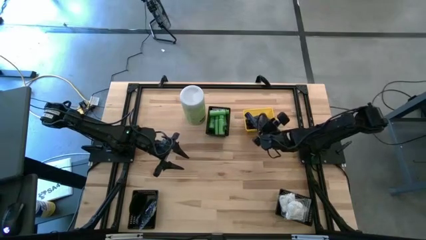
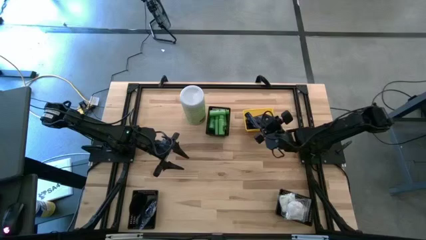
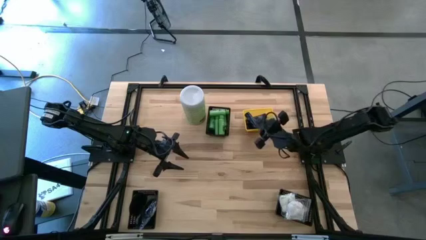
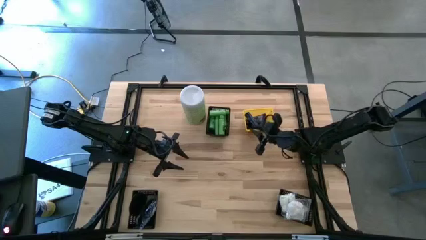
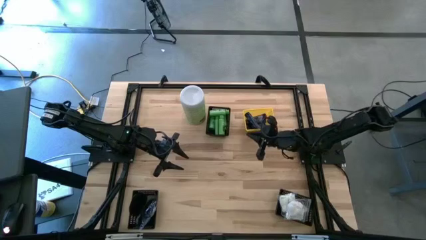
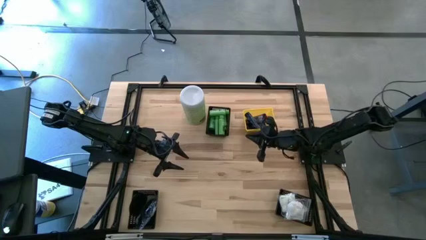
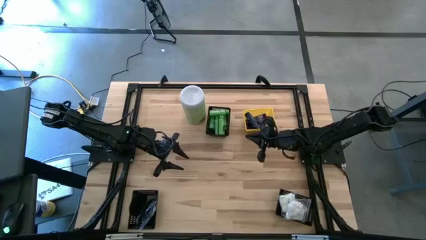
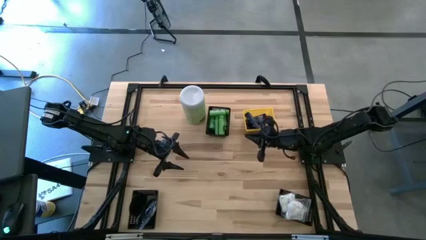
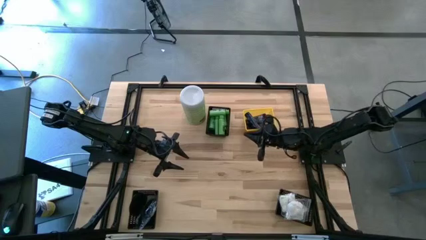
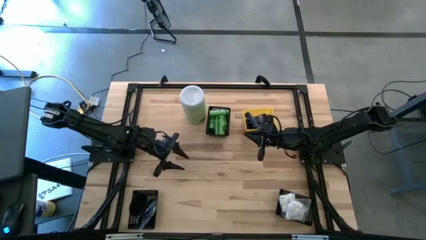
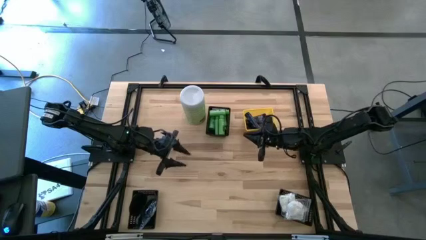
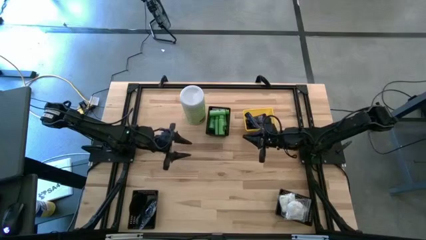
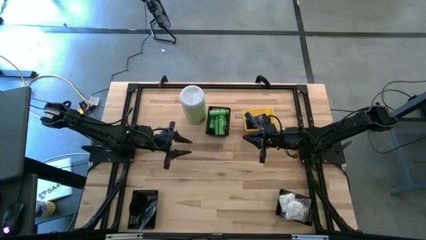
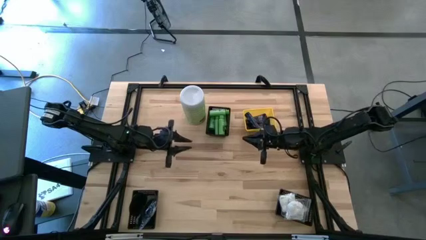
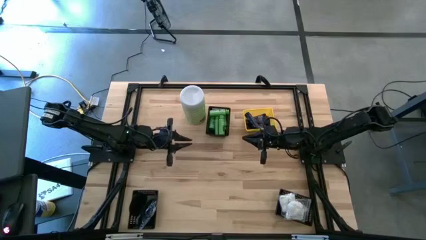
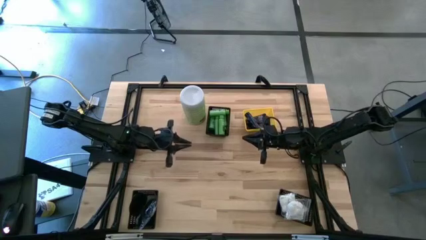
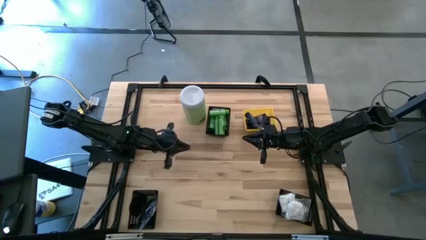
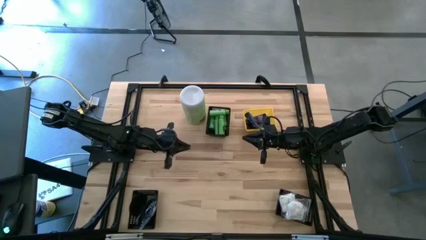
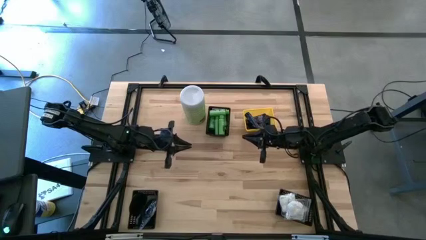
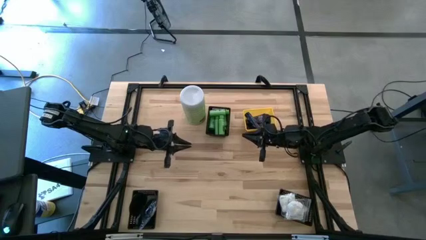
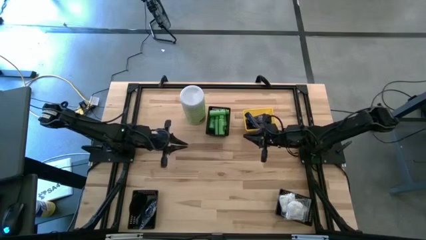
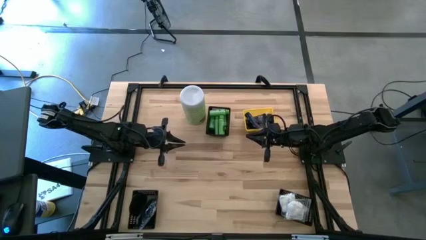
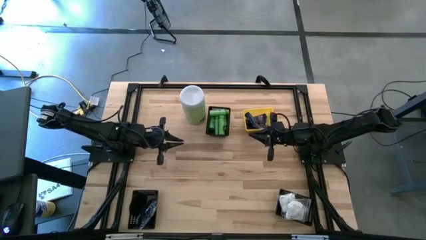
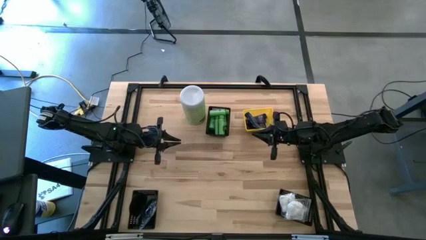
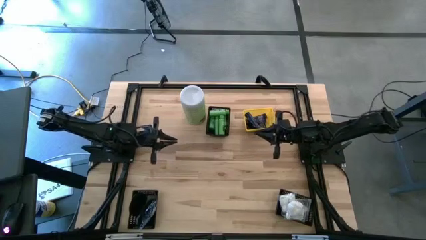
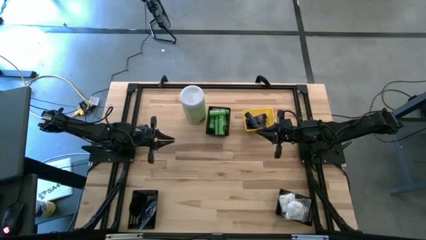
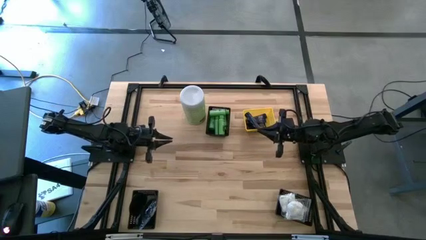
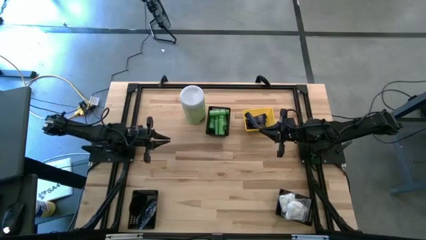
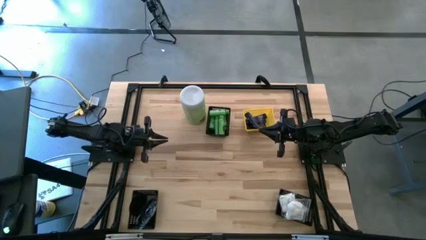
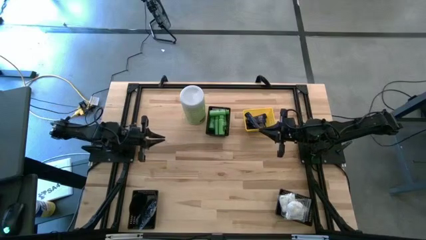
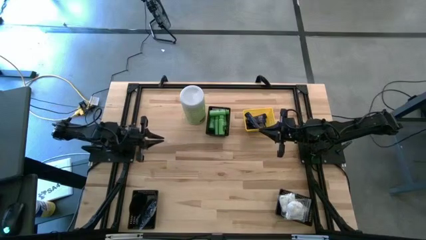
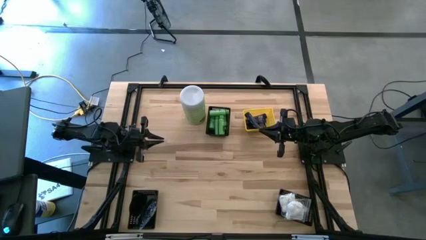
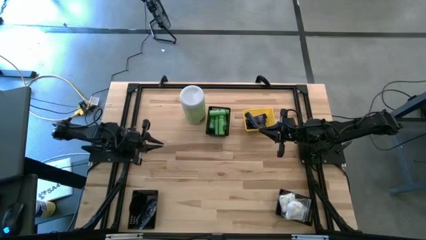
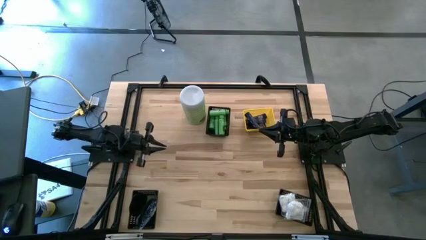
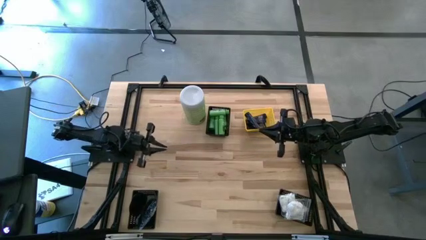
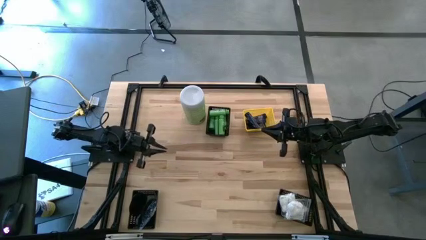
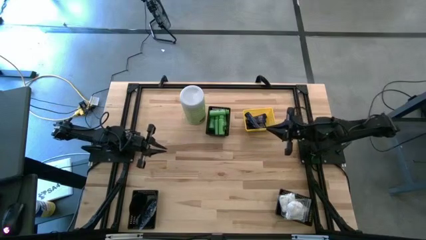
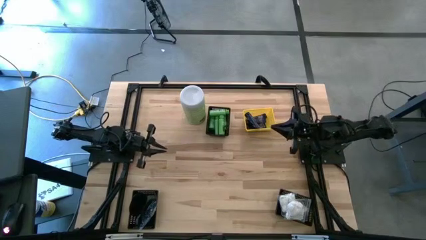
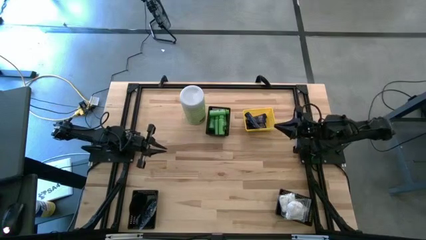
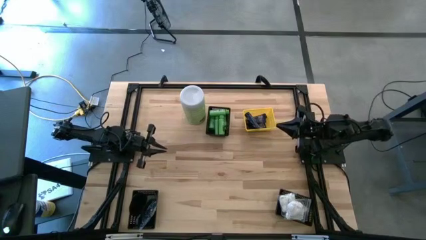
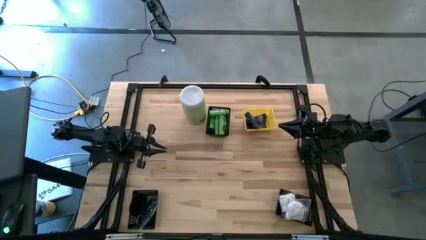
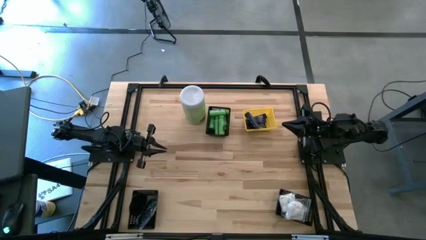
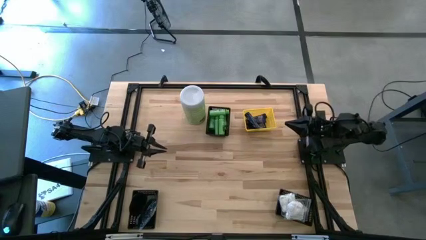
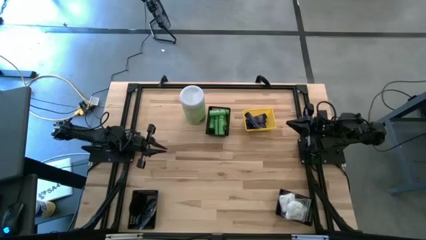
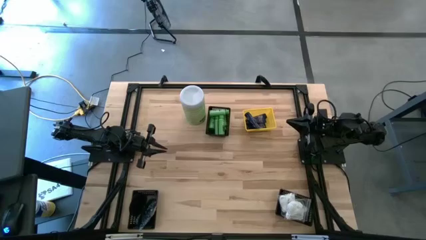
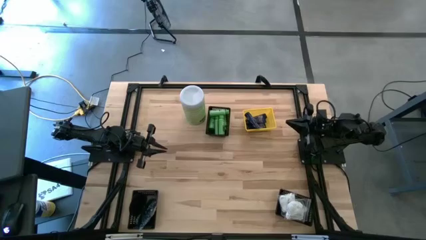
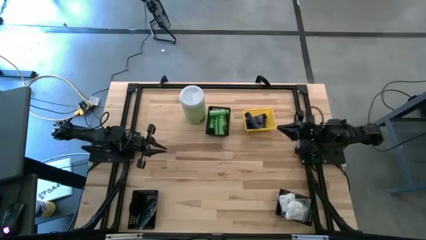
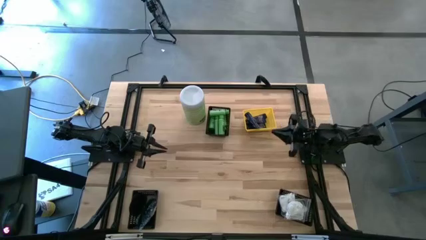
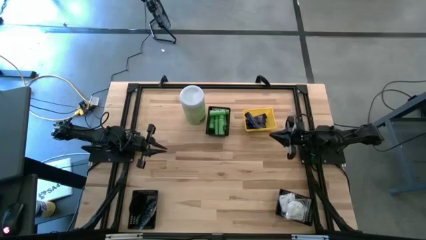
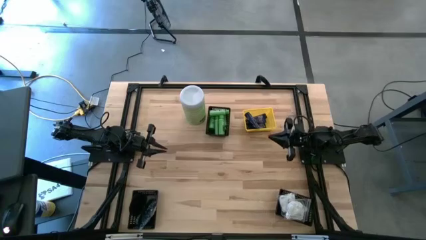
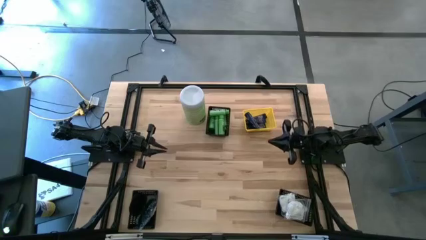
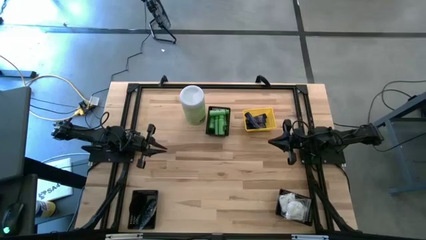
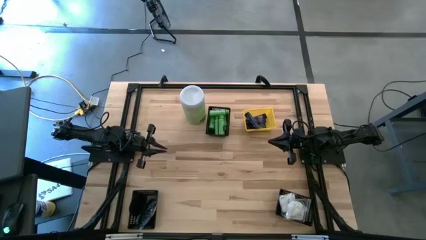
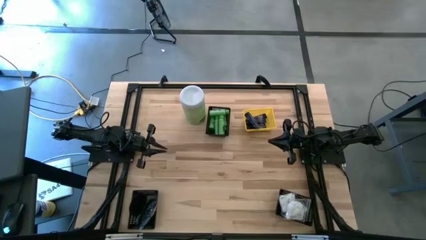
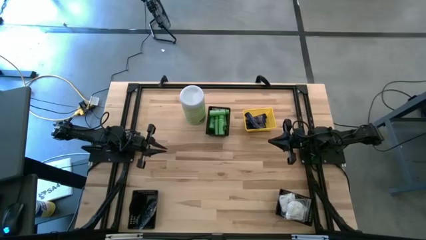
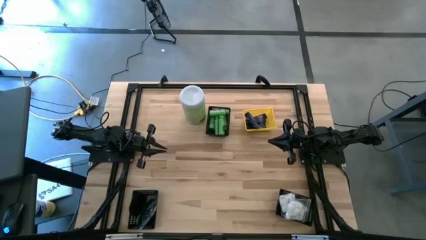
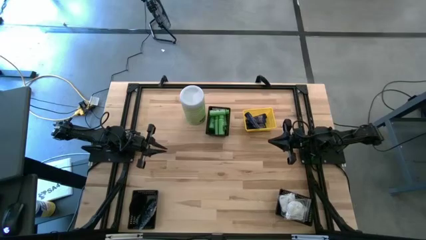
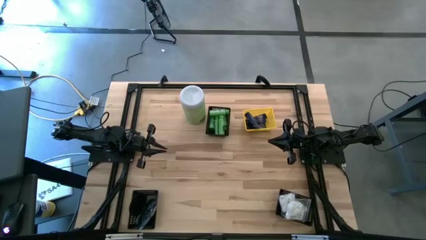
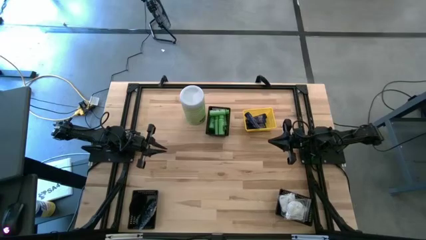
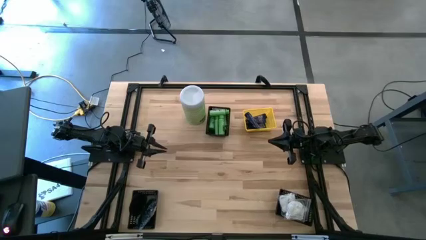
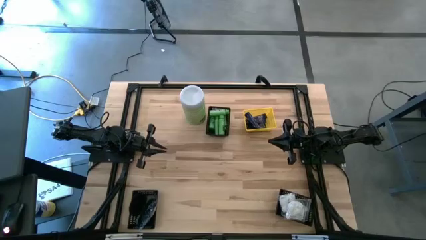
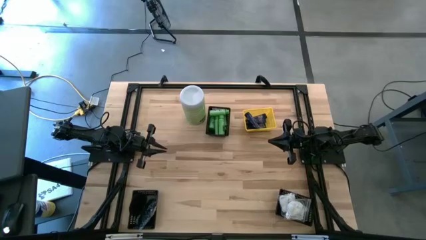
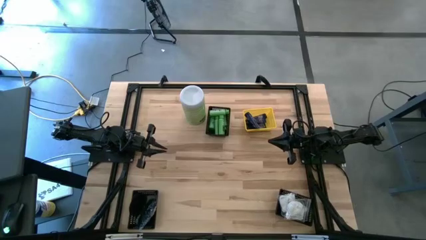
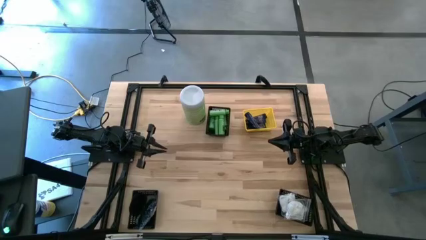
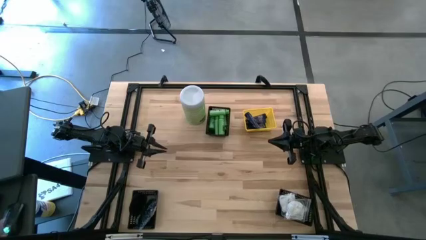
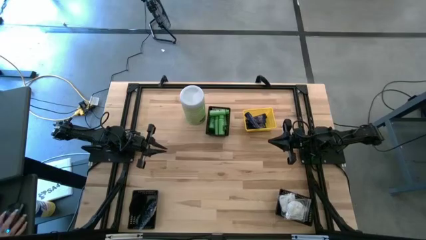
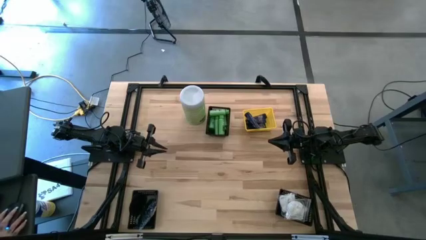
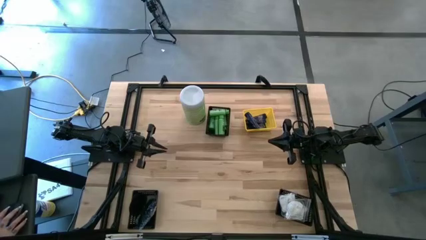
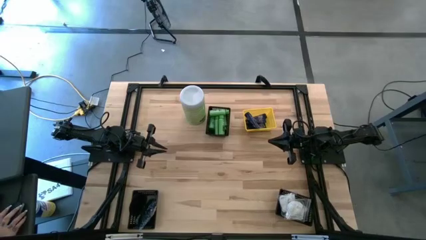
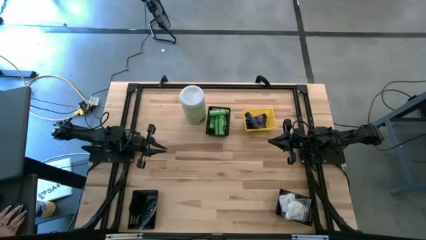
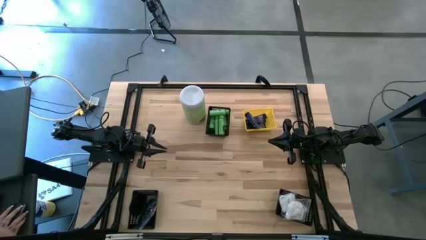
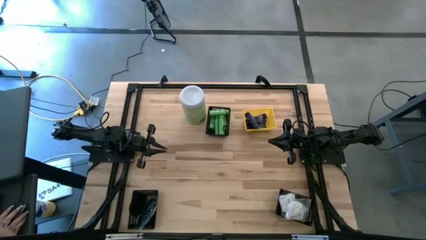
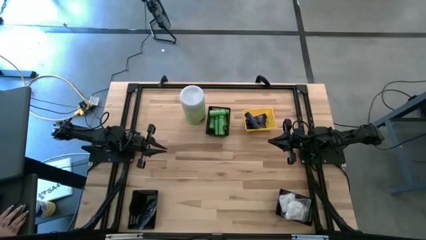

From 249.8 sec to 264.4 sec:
Task: Pick & Place Travel size toiletries
Return to Home Position
